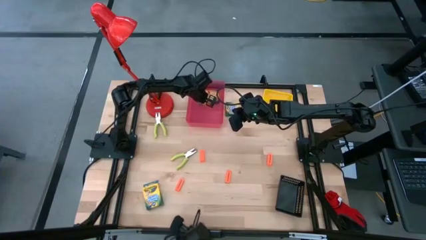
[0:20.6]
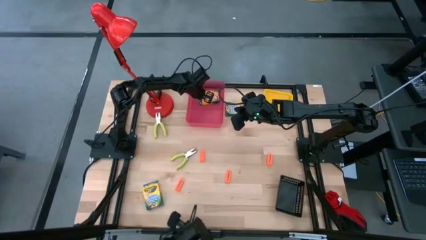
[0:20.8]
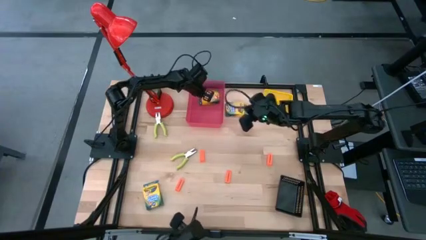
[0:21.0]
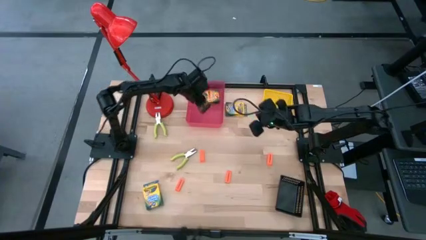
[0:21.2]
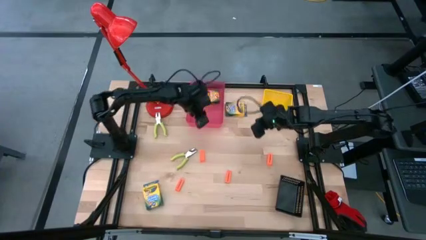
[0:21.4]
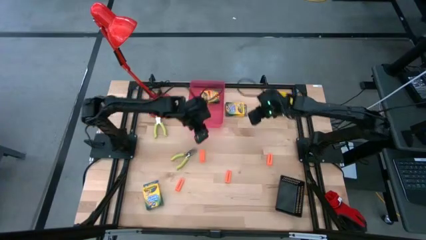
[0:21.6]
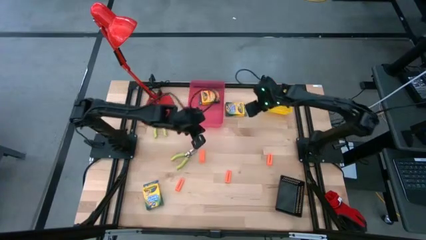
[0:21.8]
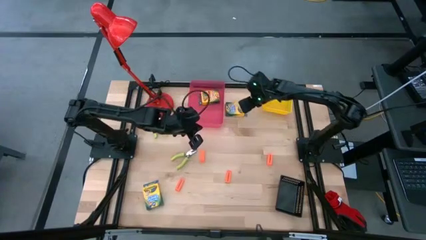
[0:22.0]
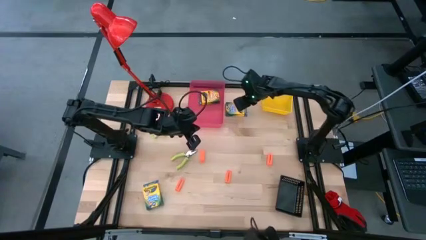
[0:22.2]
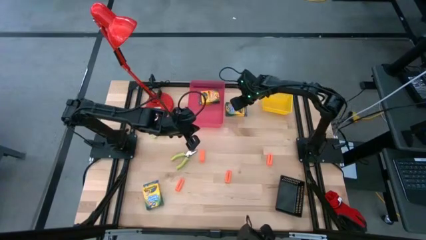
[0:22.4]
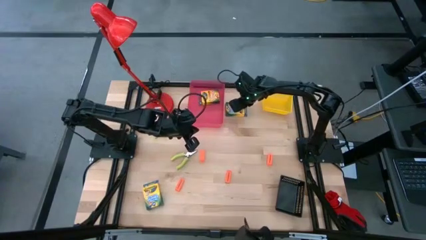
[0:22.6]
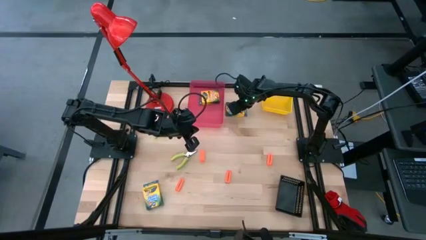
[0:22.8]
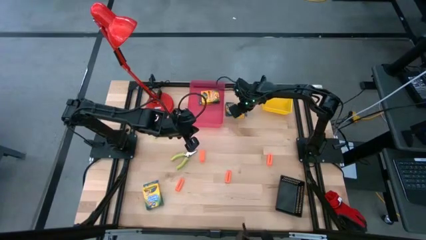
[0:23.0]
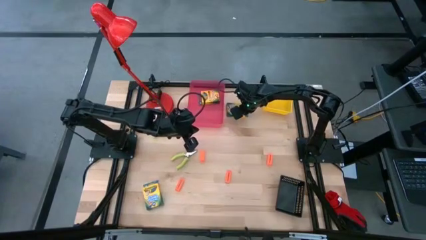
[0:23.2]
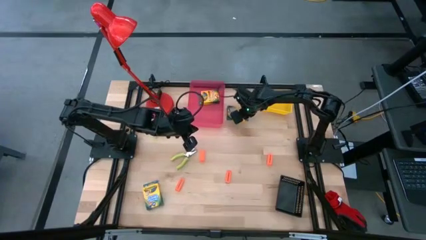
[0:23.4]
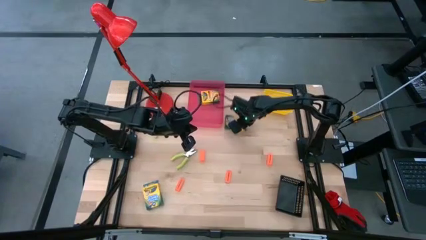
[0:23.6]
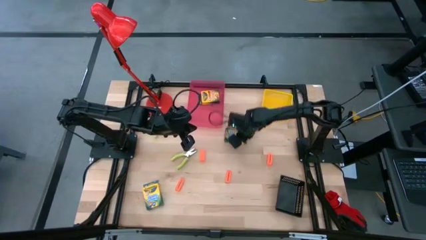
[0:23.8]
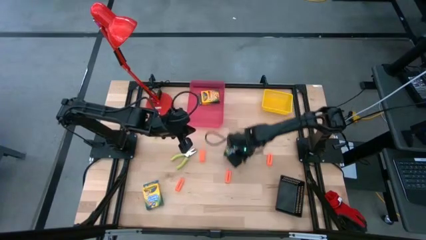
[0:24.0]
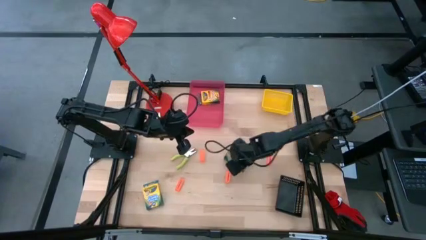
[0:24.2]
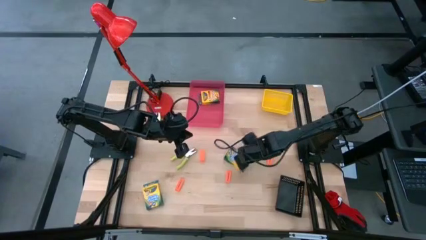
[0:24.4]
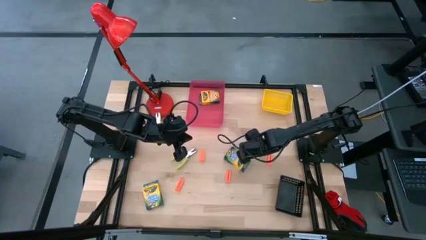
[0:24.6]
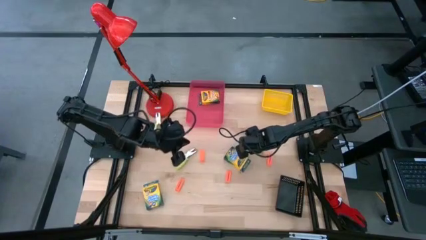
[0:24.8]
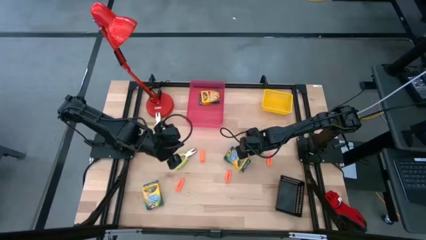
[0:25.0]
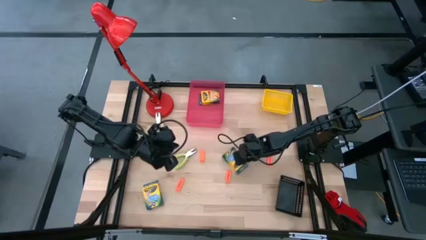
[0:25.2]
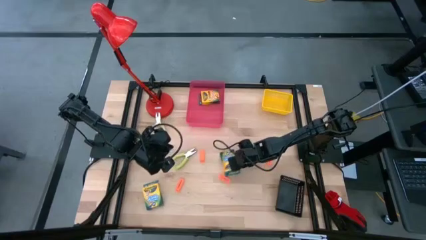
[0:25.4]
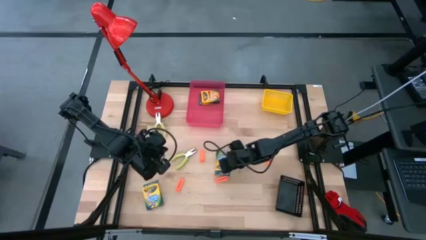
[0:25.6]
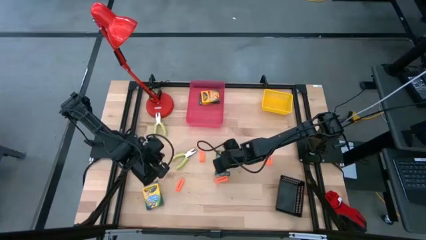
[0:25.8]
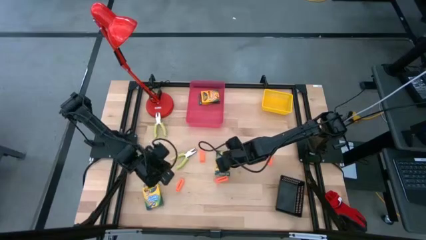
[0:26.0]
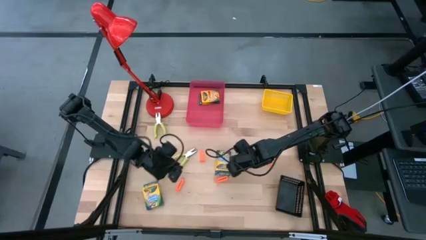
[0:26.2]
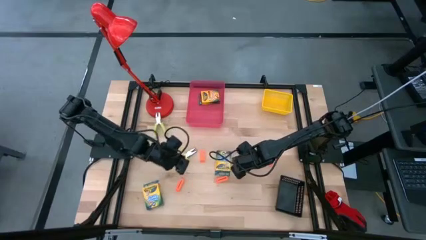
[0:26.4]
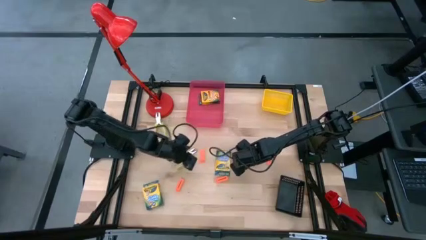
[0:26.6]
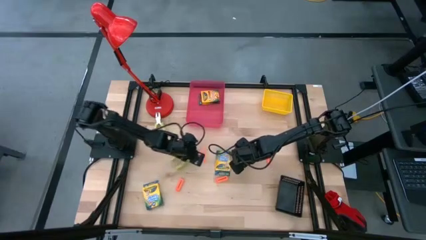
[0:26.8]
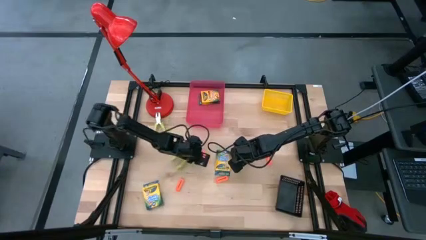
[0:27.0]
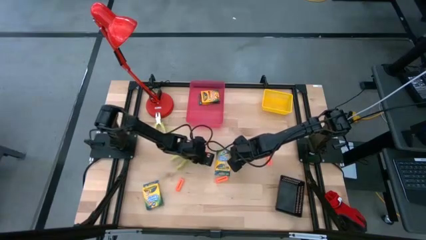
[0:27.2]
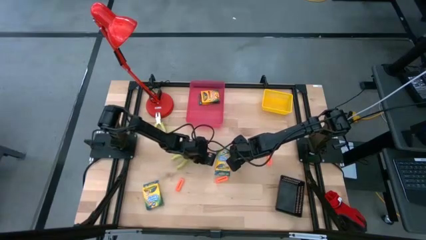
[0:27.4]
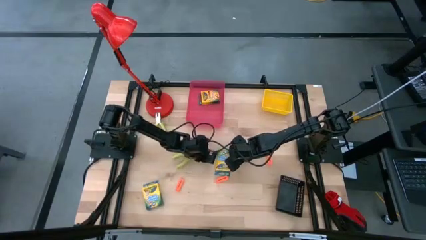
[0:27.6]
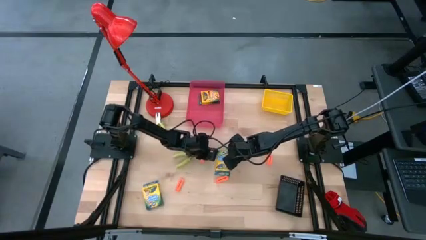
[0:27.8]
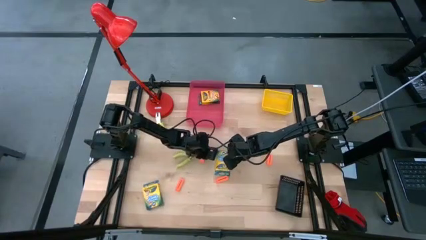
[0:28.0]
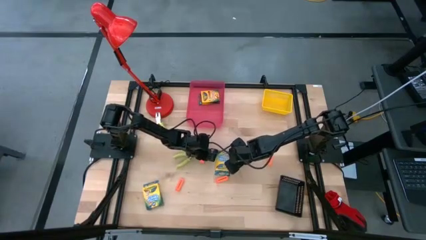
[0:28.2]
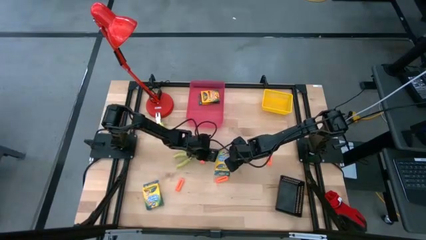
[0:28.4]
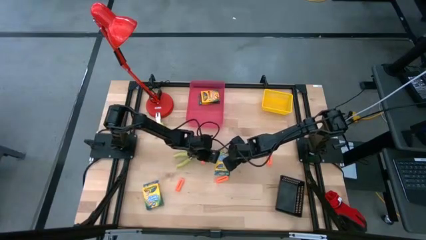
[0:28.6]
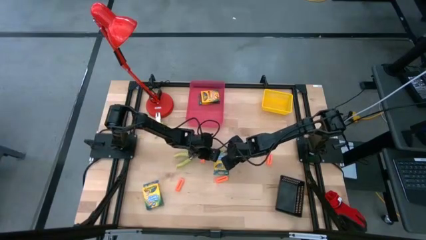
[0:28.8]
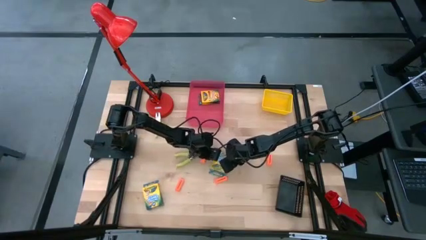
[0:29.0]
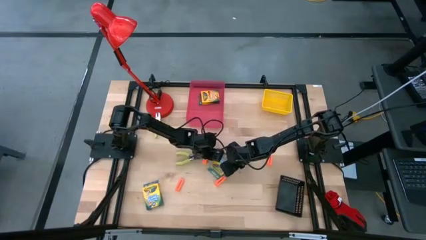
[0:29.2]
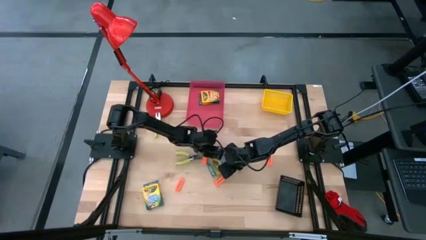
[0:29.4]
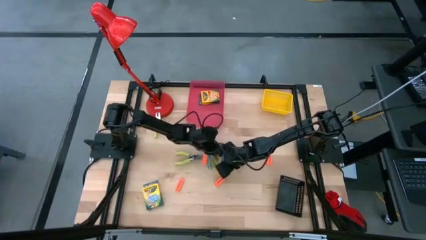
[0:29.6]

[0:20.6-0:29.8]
Task: Pick & Place School Supplies
Put the yellow crayon box into the red bin

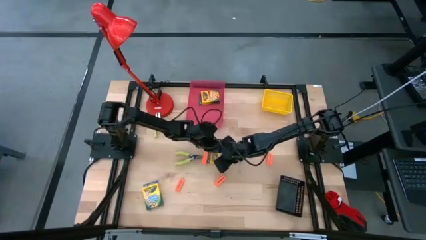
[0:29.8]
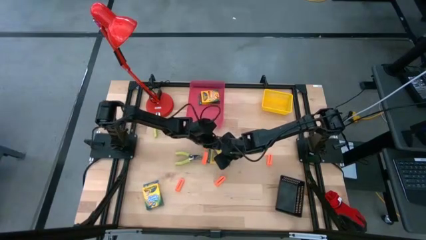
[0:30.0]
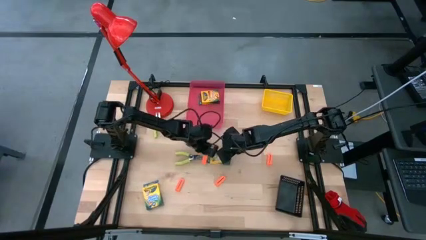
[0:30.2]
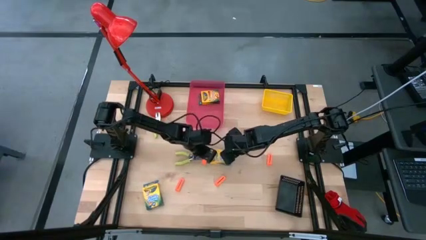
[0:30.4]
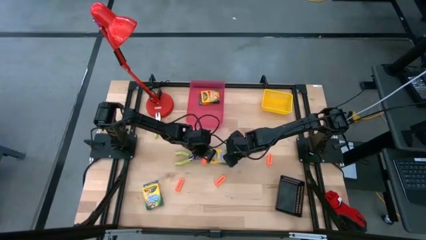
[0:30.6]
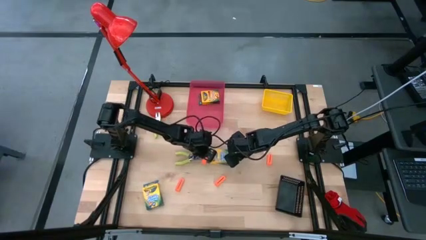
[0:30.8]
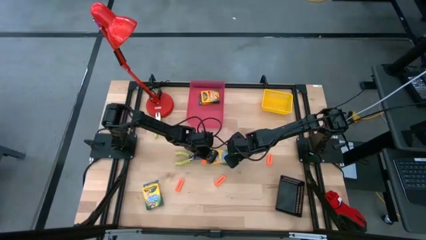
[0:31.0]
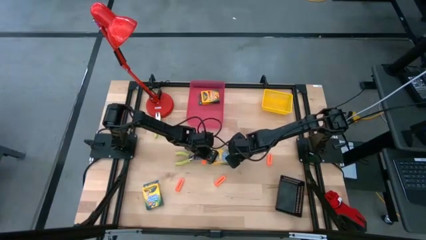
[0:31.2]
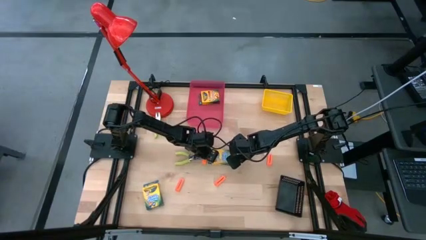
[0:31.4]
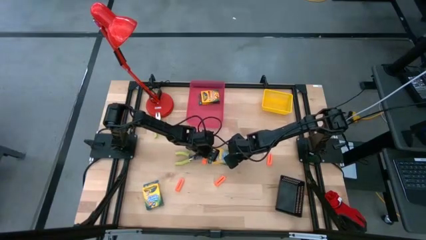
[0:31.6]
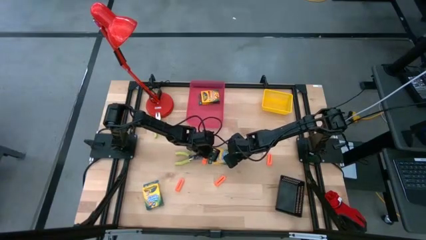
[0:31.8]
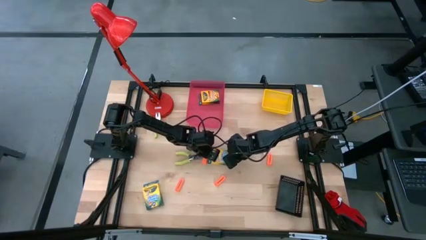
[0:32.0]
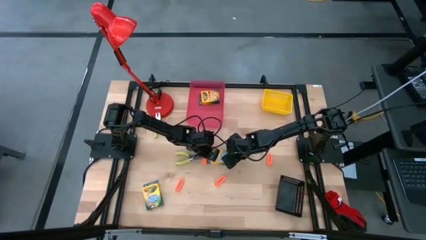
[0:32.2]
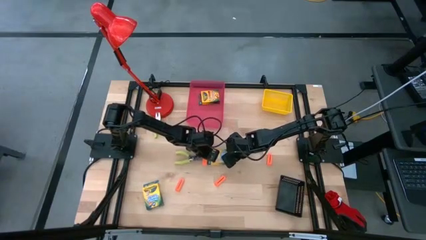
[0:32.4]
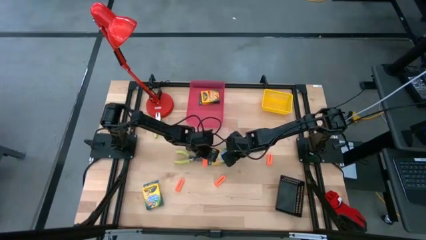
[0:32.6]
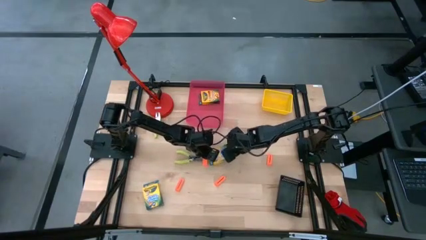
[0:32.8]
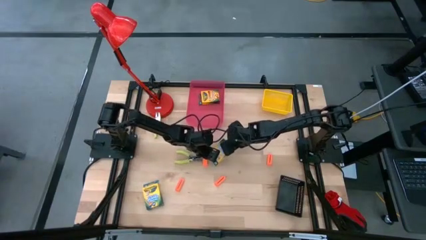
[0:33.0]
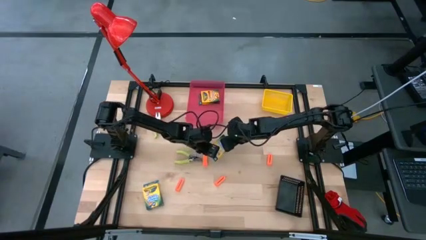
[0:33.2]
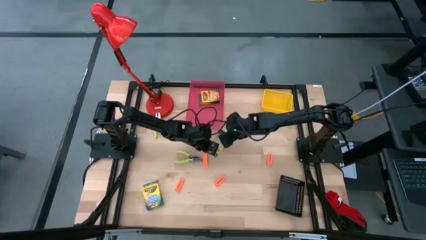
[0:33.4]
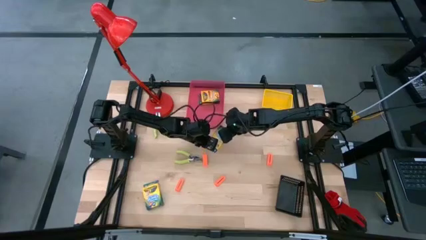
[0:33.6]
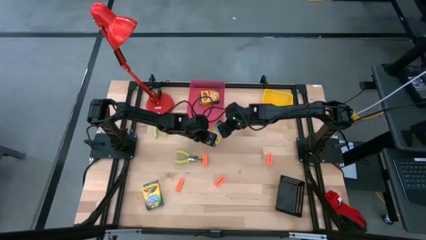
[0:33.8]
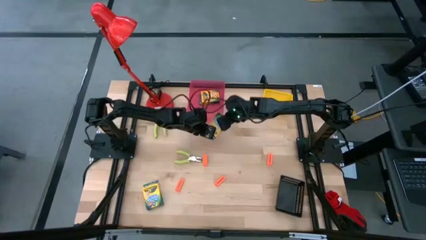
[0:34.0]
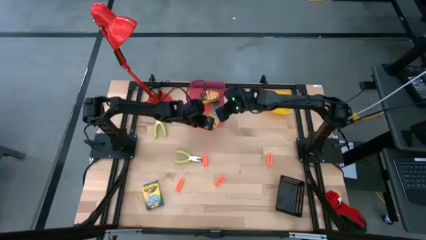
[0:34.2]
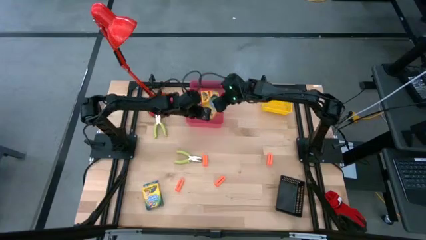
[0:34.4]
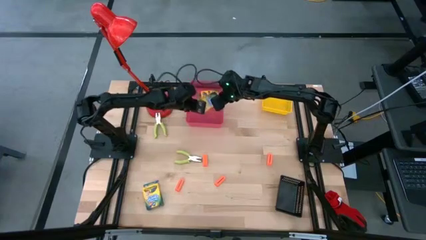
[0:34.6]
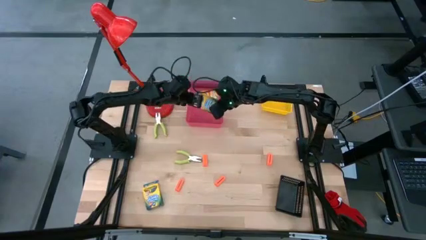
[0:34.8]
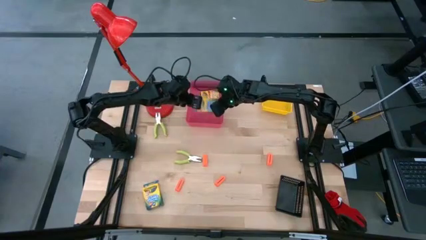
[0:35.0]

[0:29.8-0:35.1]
Put the yellow crayon box into the red bin
